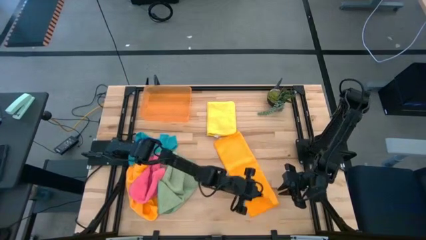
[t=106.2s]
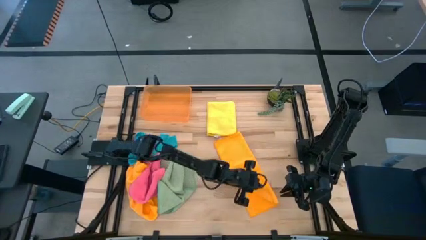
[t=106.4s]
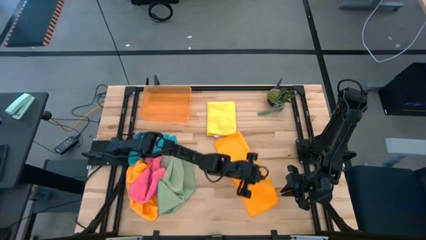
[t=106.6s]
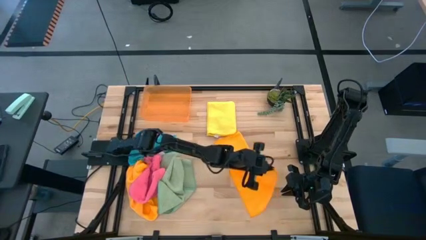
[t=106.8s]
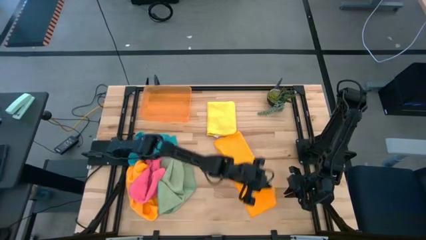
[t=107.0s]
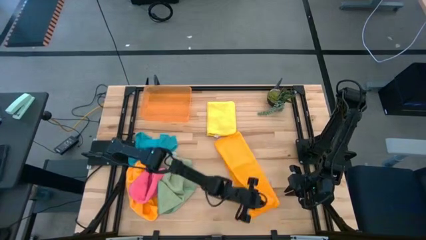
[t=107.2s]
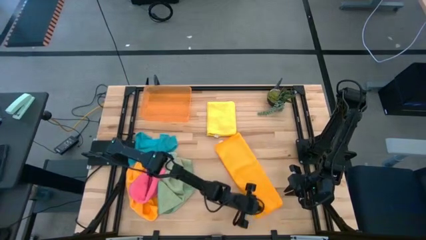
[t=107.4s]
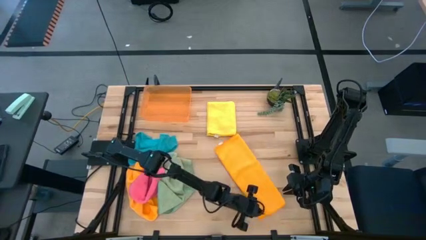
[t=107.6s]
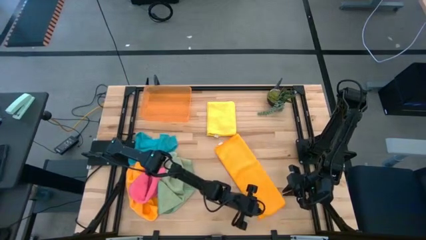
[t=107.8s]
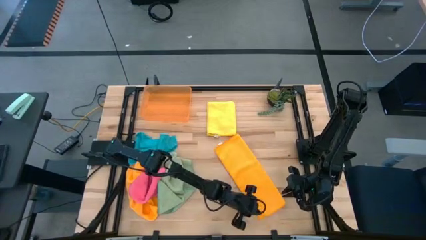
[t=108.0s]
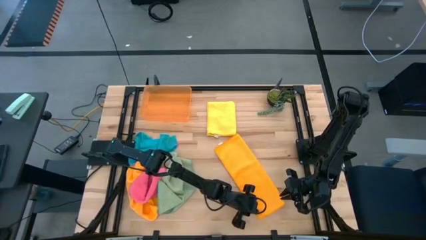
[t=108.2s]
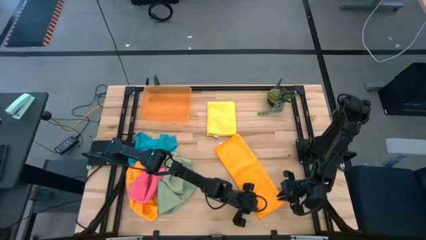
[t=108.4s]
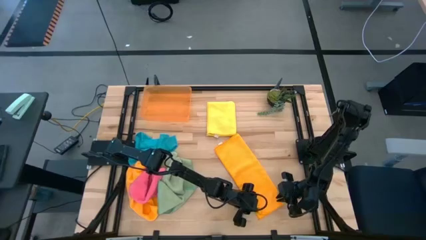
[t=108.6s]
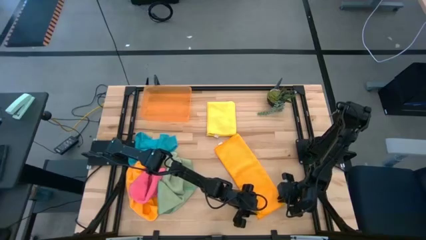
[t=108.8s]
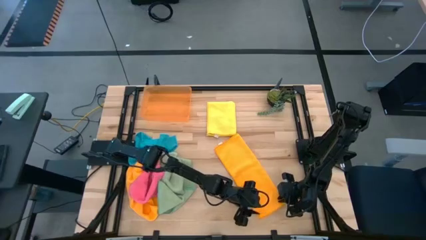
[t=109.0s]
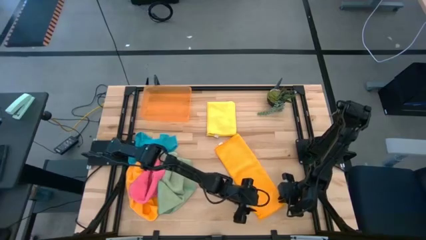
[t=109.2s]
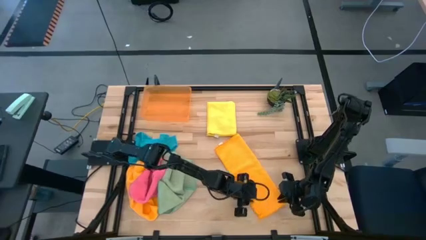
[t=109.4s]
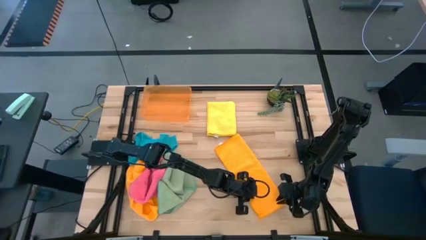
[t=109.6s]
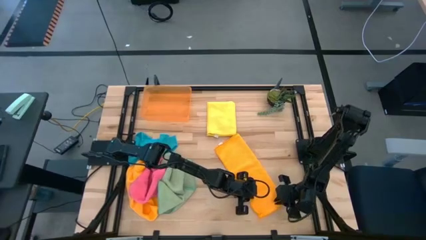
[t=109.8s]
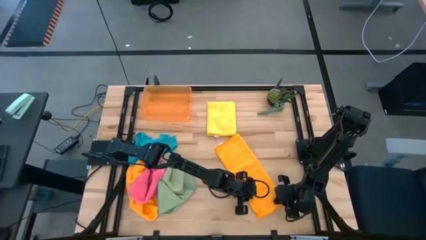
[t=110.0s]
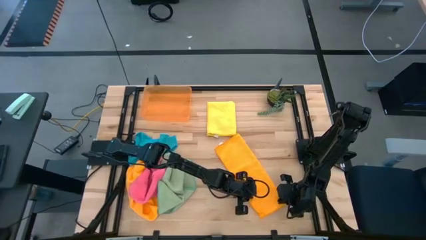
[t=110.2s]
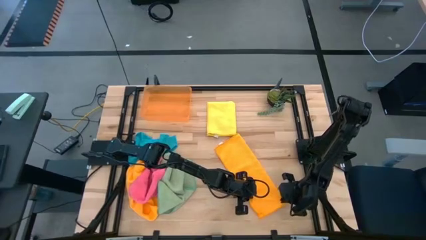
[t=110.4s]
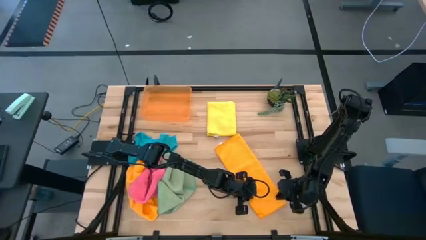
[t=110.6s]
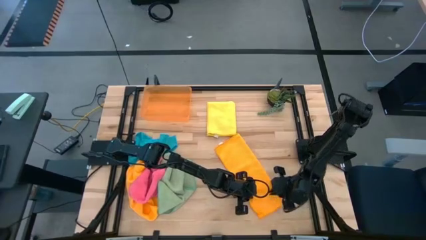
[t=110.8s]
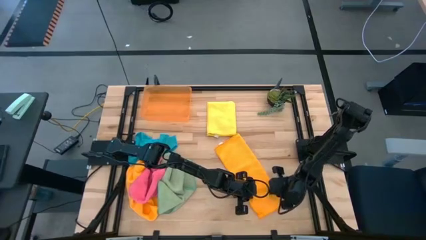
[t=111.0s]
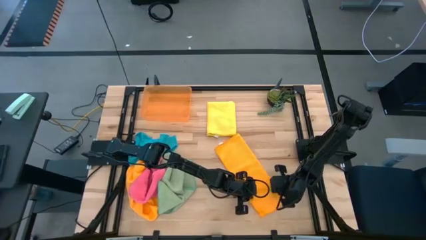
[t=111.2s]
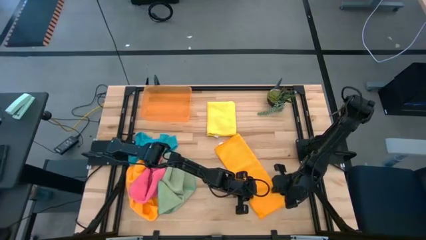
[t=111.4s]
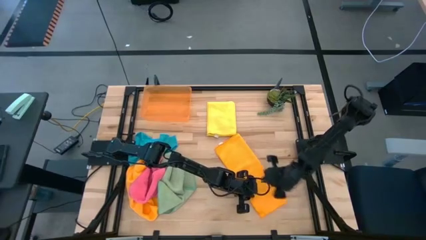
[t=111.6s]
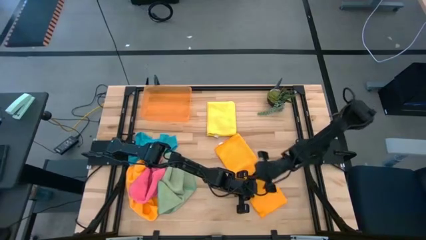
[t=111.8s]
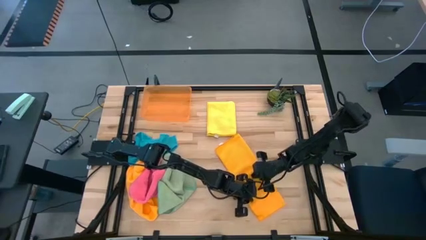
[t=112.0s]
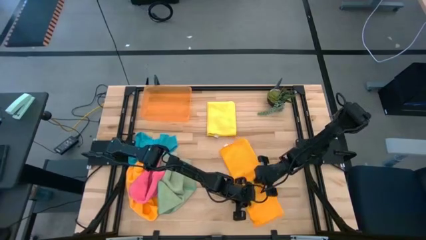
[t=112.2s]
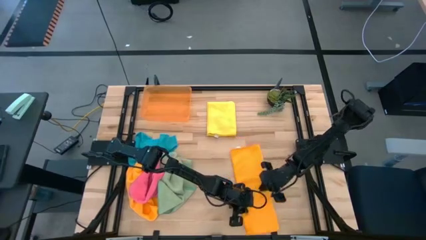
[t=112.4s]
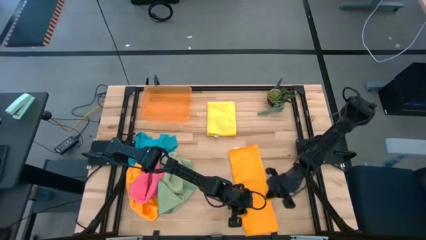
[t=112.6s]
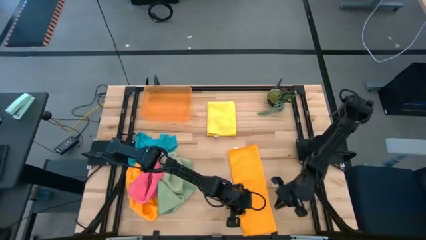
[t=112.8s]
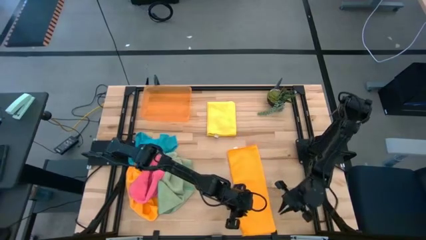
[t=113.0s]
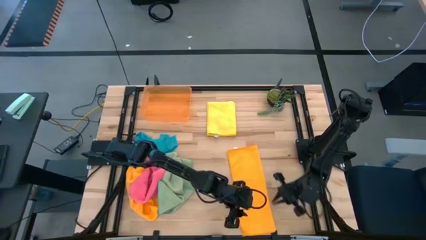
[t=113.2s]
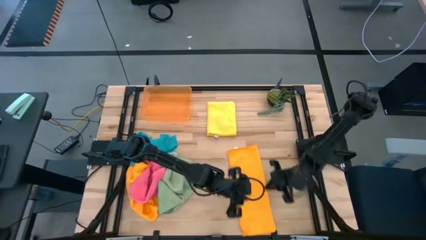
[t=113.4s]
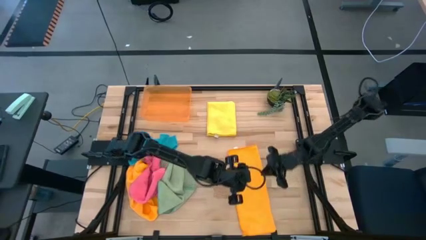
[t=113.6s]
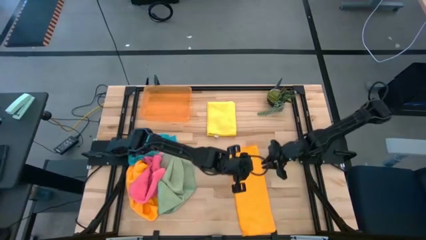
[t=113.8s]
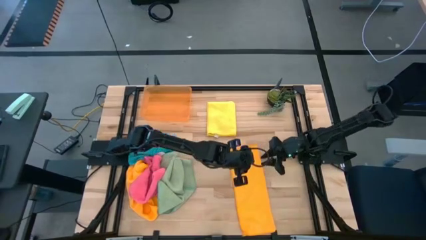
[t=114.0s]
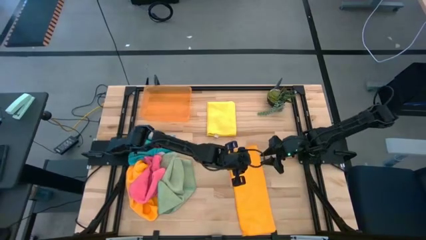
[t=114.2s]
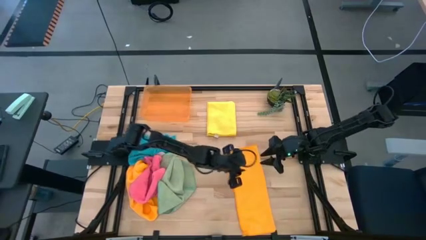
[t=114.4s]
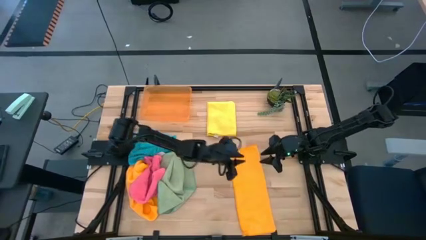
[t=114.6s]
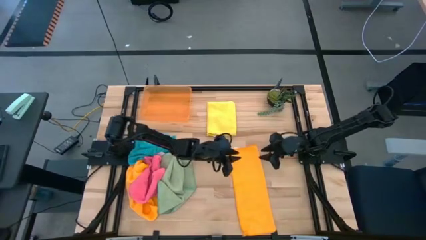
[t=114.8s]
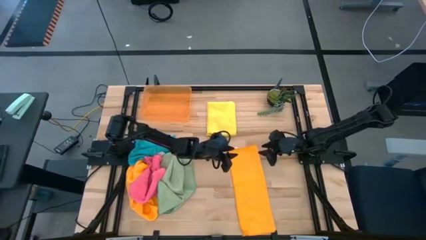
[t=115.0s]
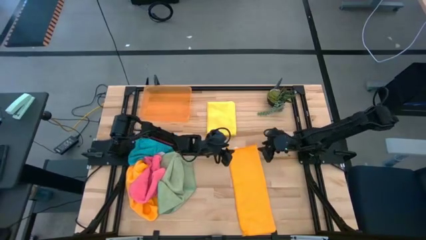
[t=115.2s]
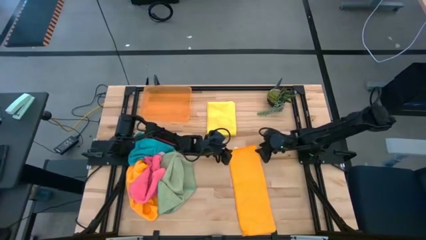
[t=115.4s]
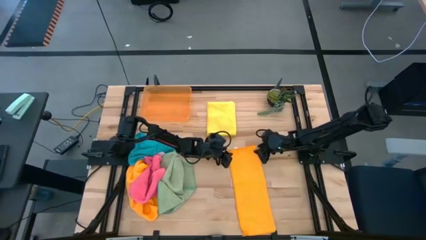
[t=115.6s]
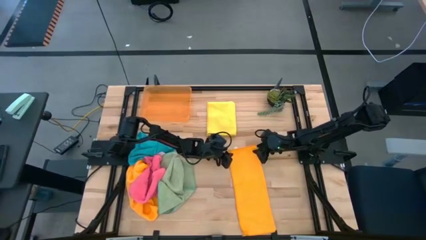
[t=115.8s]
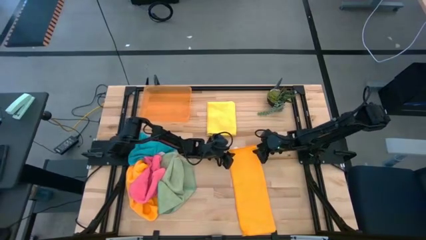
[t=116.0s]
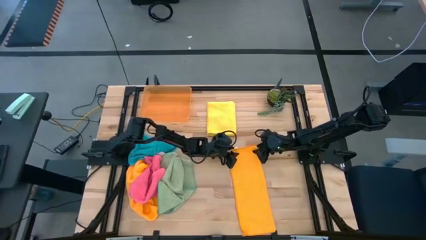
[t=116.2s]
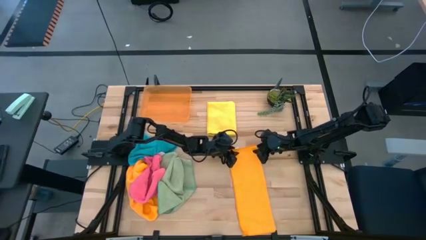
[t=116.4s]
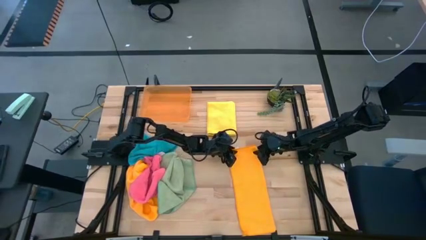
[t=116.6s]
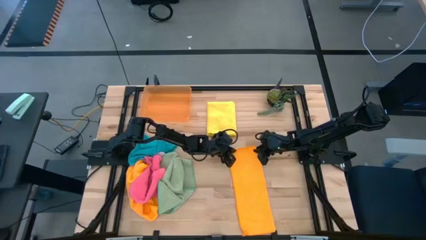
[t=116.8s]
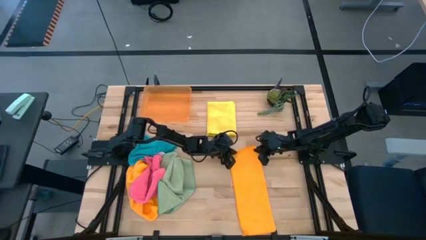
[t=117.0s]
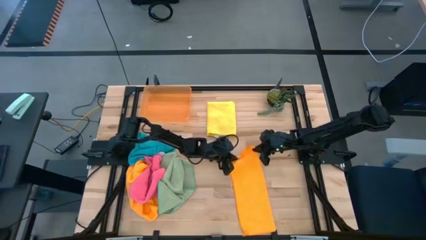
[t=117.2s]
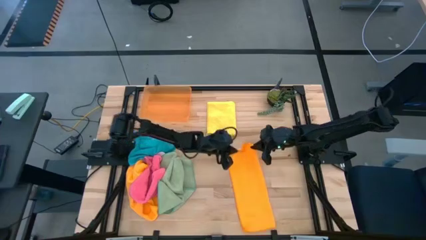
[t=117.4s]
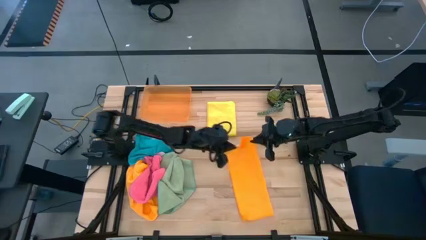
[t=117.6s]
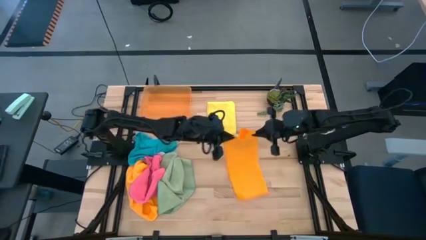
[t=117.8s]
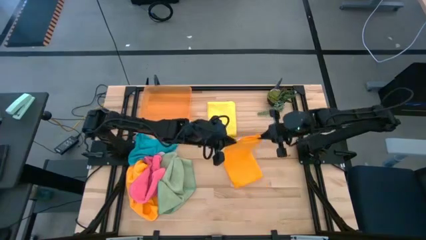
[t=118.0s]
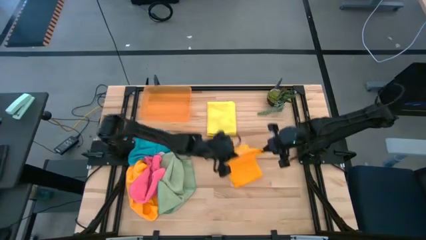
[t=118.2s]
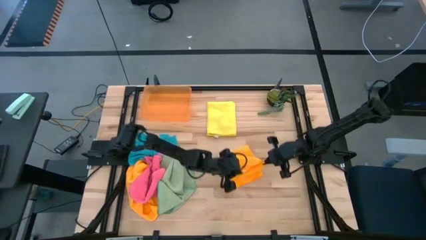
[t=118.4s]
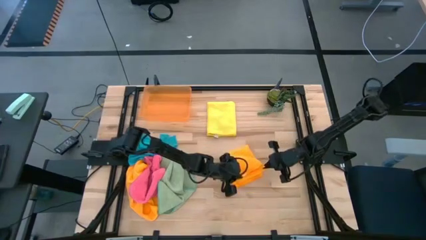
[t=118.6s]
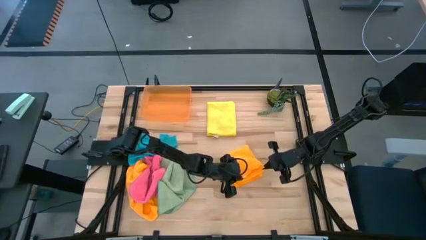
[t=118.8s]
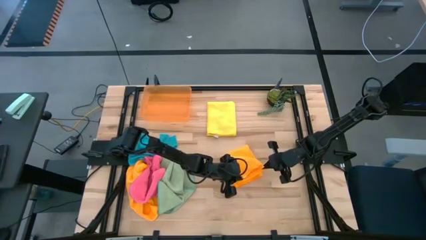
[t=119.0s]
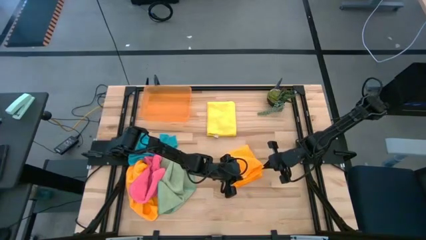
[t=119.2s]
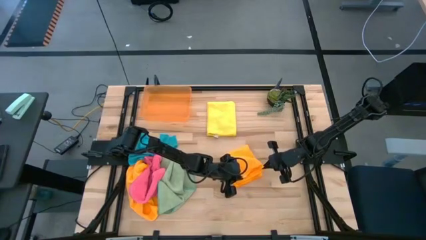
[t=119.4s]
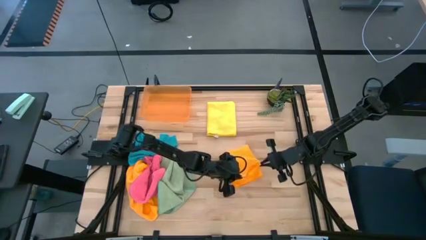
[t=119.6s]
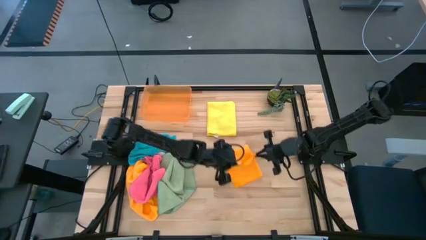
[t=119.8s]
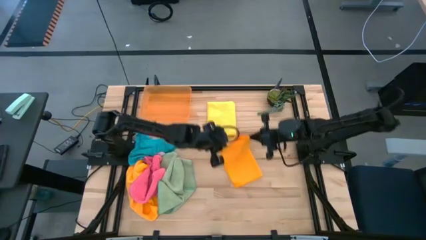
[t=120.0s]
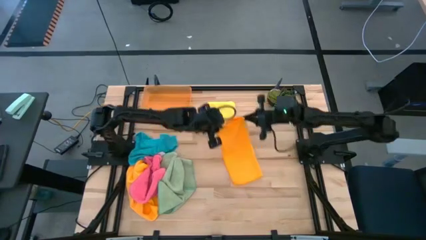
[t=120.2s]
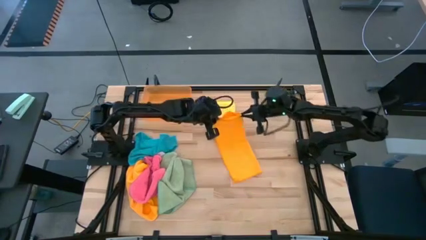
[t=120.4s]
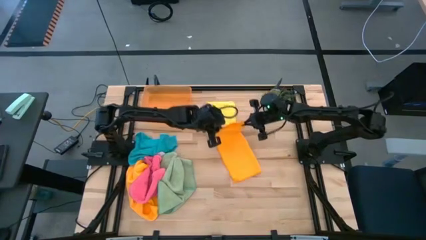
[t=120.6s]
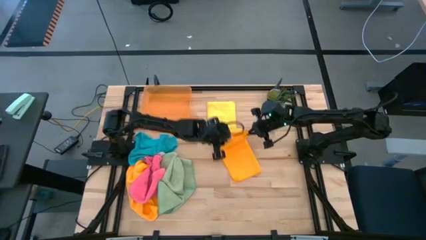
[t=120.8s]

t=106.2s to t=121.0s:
Task: Fold microfiber towels
Fold the right orange towel

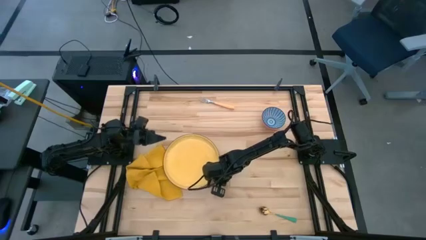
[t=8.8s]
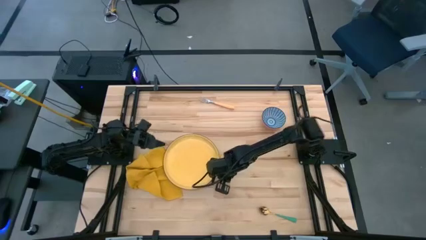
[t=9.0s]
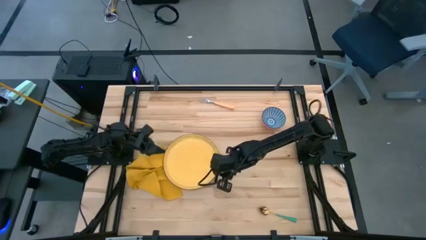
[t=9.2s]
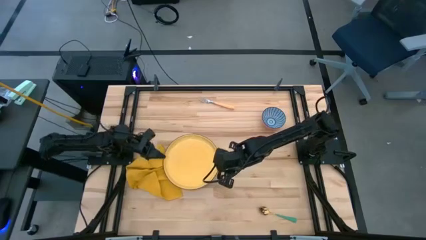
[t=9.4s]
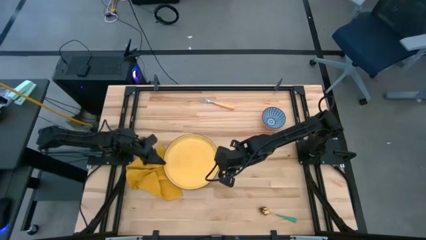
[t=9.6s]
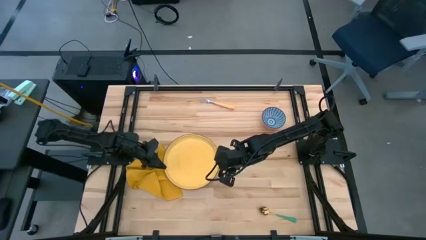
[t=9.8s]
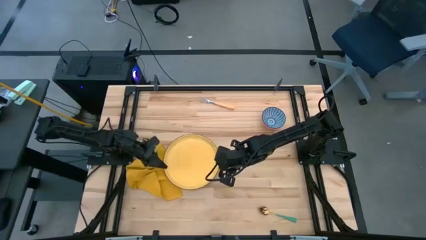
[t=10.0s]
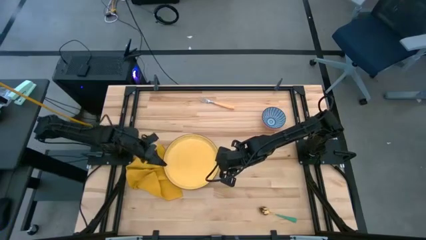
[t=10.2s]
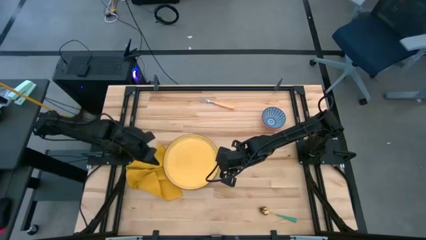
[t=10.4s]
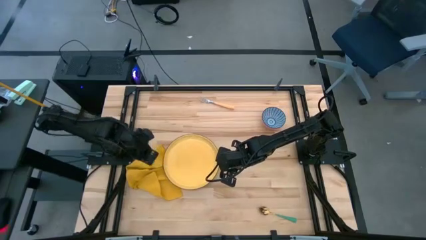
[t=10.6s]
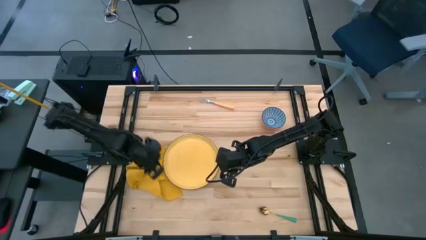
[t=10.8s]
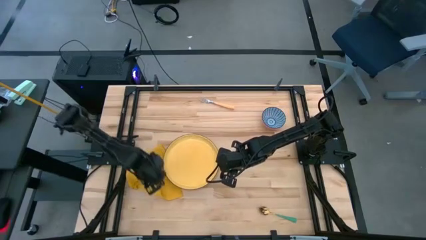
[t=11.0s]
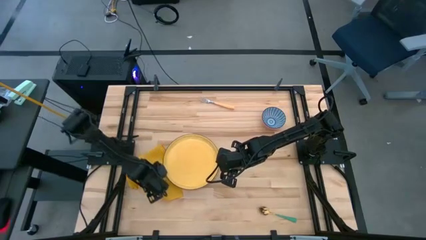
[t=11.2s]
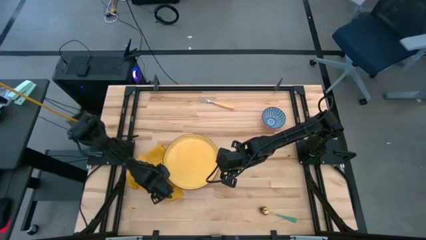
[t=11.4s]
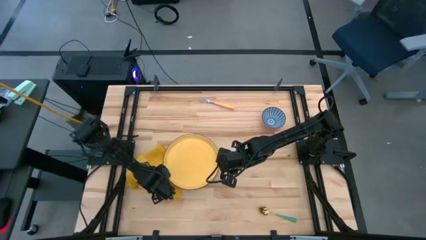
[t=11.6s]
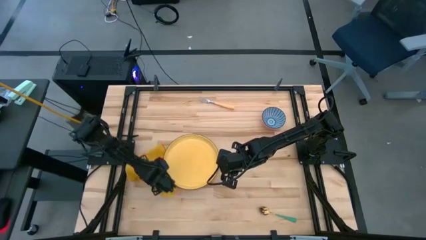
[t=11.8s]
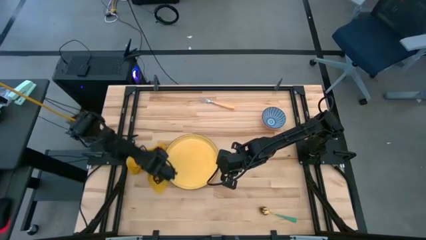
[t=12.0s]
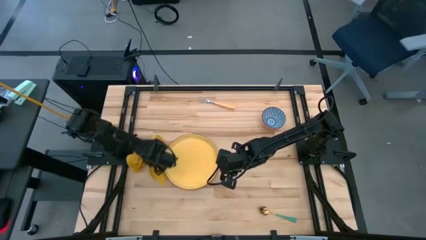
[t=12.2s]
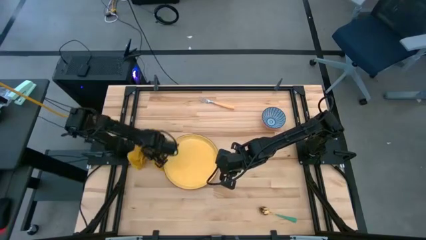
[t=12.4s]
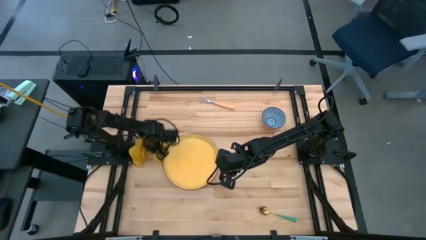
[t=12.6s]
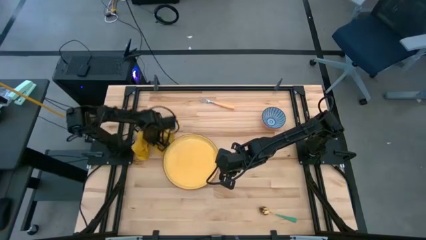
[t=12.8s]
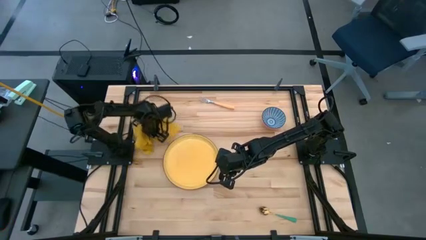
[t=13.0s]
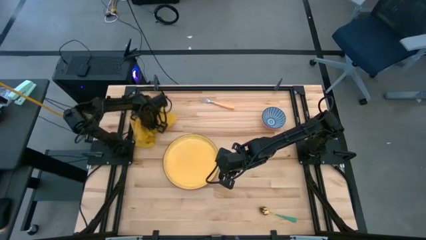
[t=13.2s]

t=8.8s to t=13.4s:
Task: Set table place
Move the yellow napkin to the top left of the table
